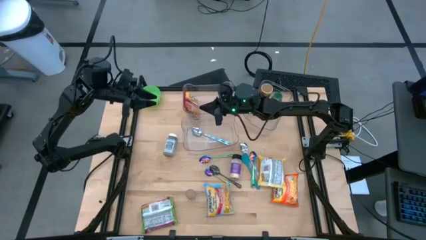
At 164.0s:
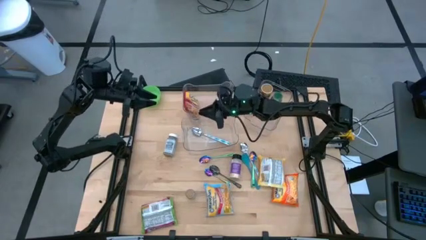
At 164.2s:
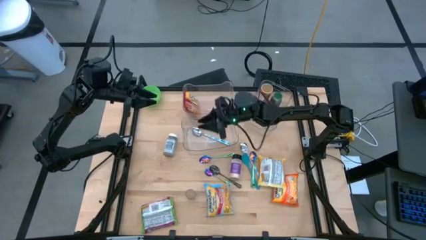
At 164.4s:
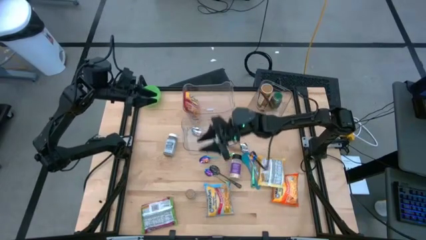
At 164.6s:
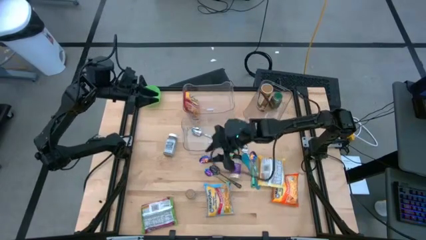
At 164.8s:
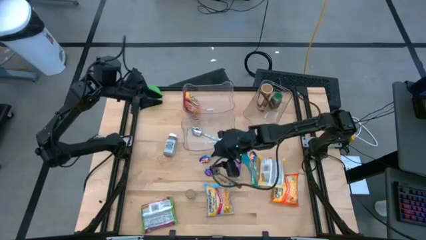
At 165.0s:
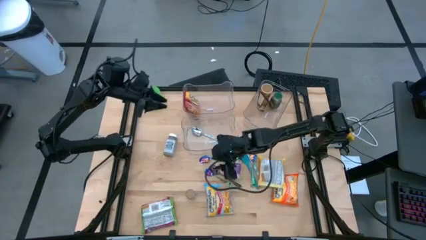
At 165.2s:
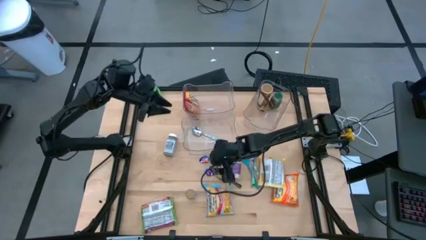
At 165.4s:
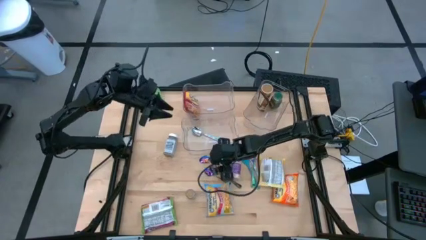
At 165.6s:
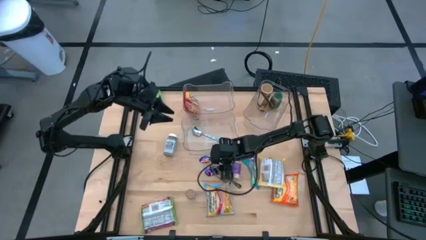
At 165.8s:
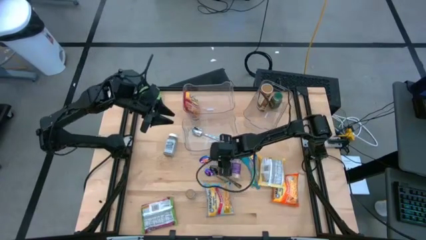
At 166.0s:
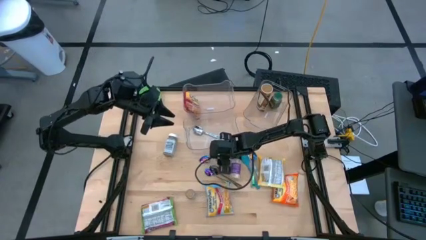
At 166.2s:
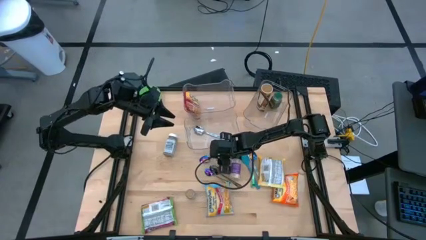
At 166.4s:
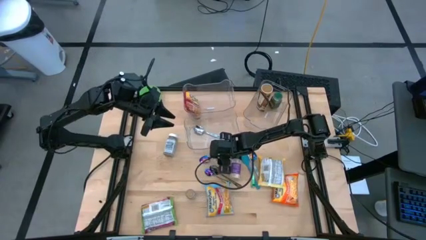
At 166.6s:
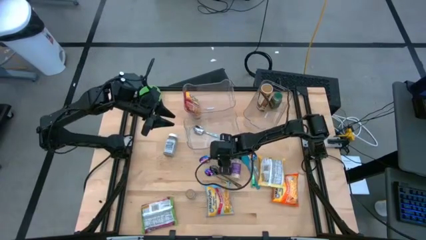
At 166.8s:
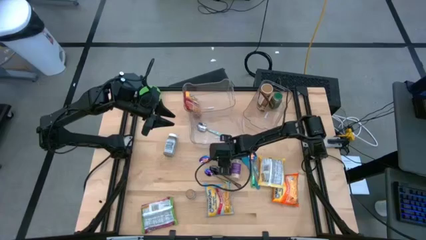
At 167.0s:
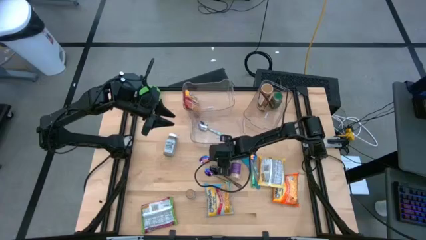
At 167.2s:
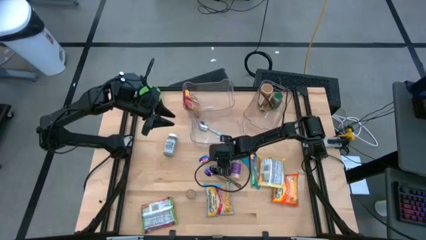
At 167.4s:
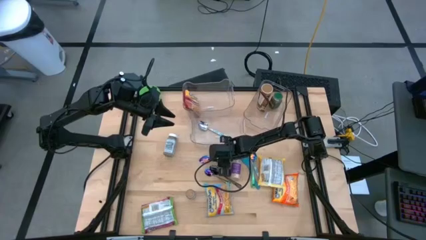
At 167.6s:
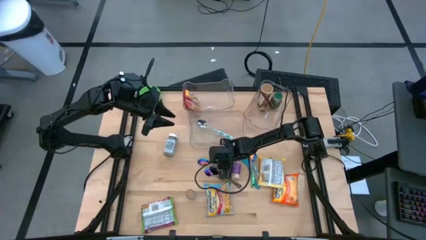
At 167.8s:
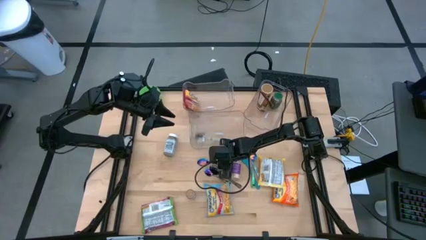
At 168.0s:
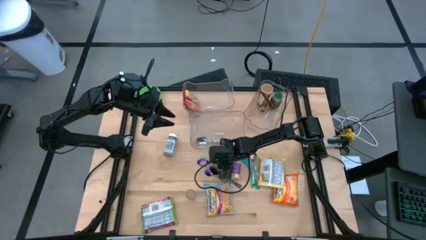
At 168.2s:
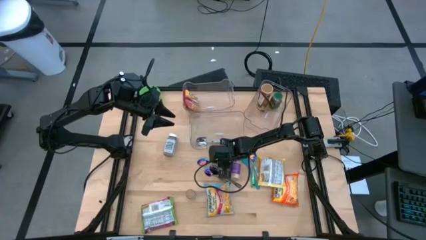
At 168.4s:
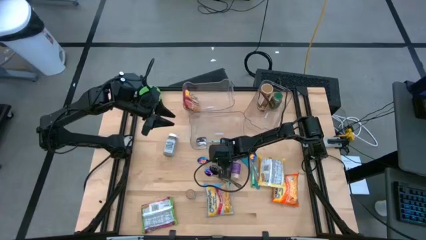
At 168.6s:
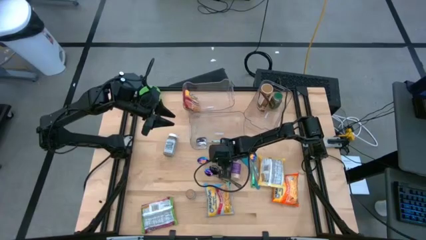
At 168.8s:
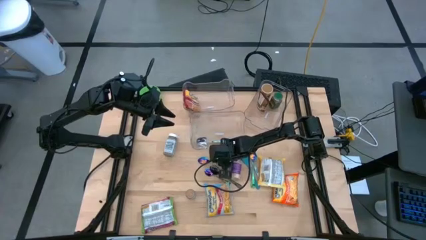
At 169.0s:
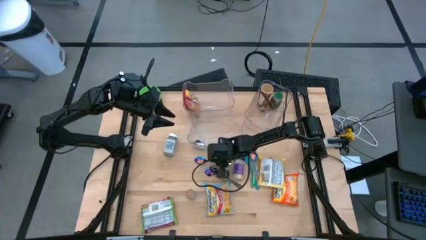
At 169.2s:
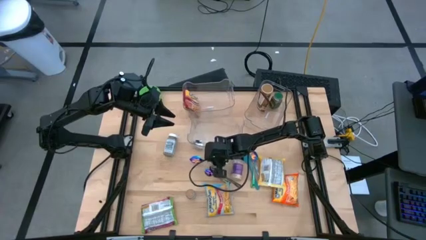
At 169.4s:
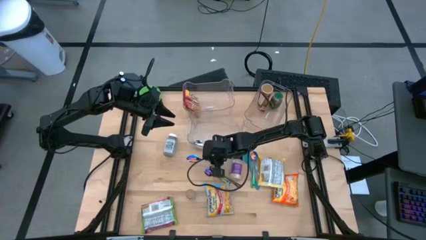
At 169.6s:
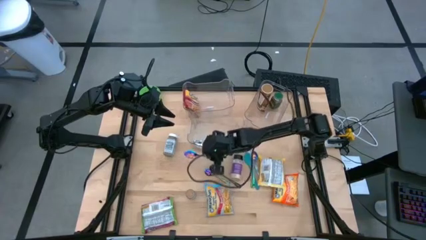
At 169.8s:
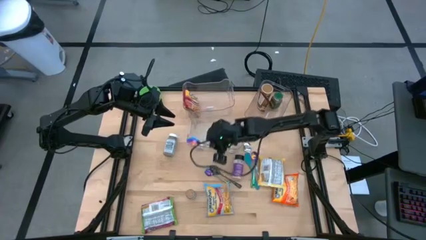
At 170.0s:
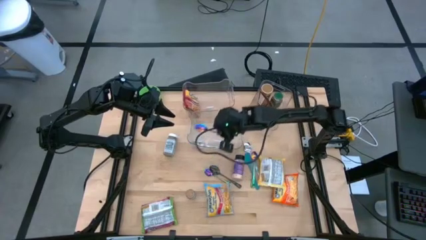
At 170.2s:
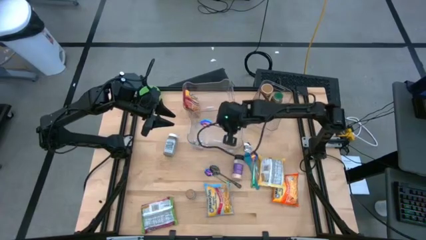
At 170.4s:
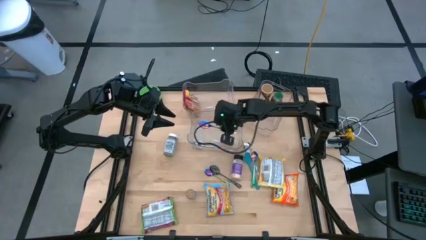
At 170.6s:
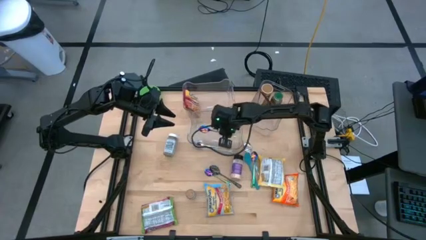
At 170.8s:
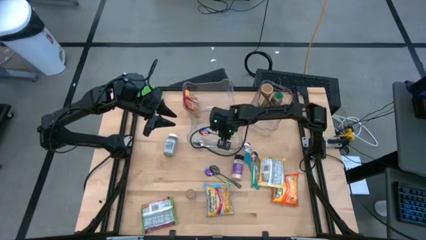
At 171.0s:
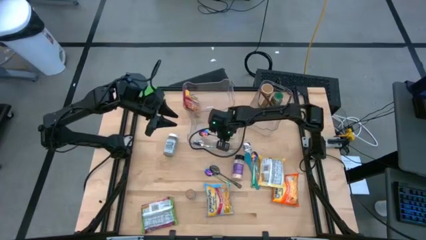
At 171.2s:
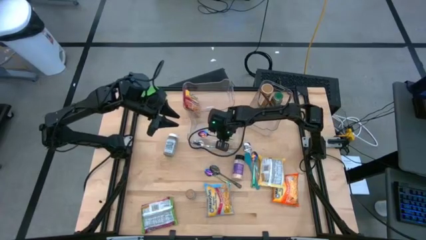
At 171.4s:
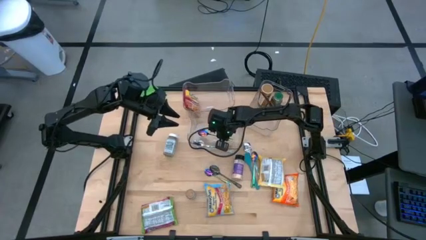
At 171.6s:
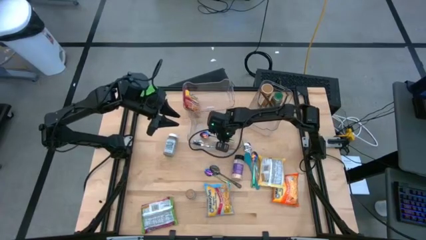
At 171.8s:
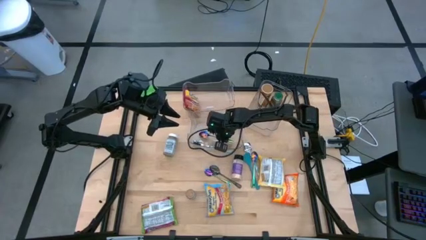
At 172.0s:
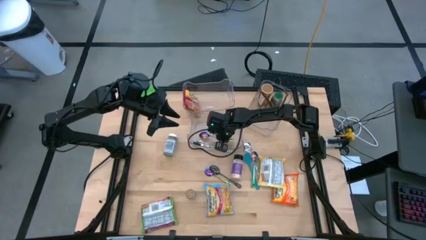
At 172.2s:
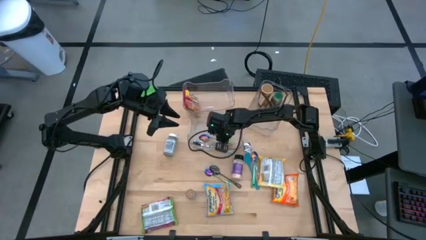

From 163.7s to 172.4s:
Task: Pick & Place Food Item
Put the left green spoon into the bottom transparent bin

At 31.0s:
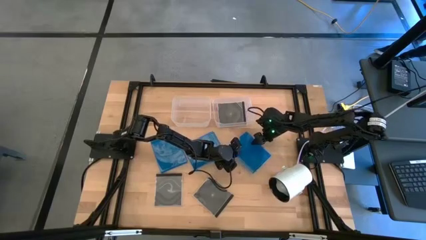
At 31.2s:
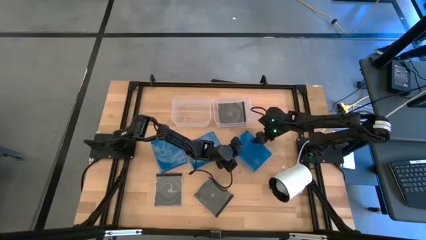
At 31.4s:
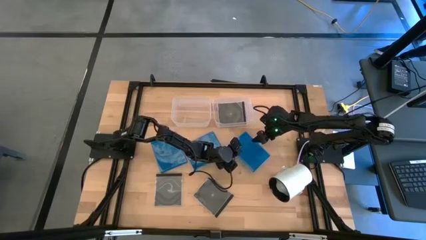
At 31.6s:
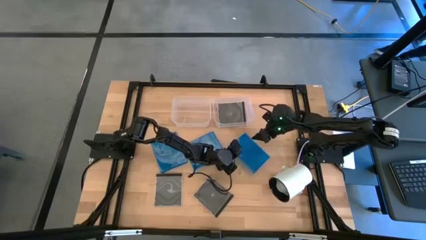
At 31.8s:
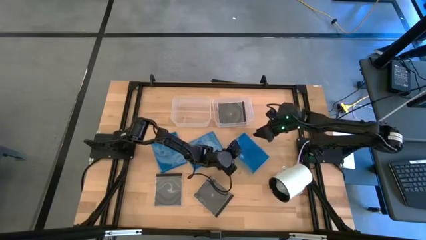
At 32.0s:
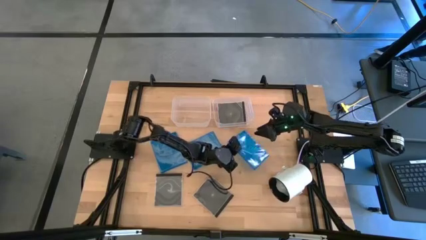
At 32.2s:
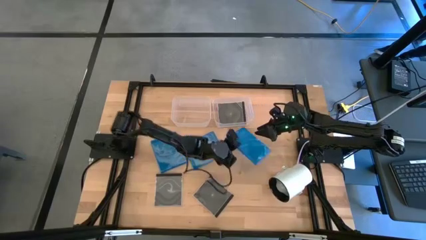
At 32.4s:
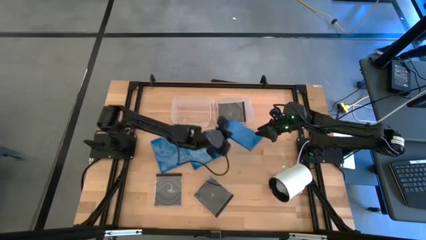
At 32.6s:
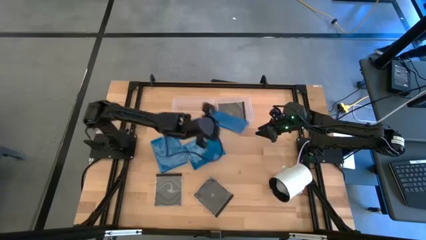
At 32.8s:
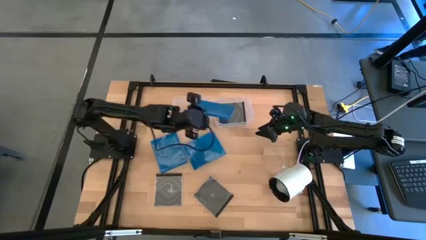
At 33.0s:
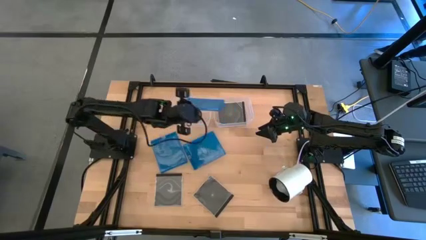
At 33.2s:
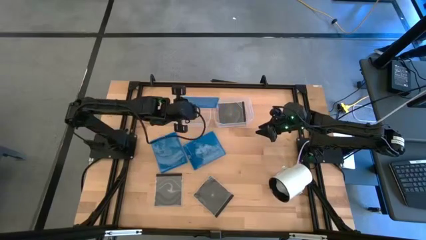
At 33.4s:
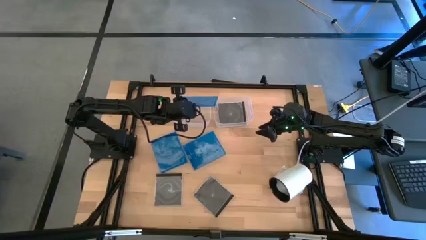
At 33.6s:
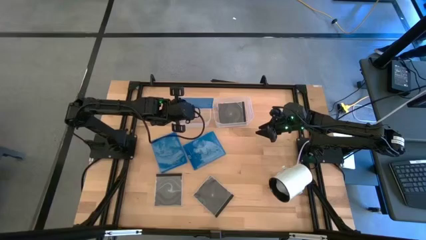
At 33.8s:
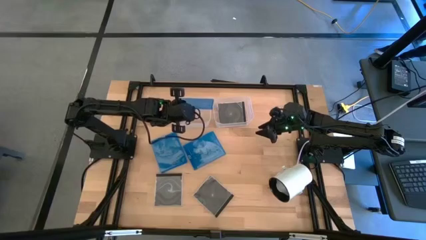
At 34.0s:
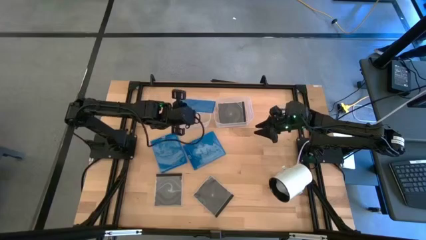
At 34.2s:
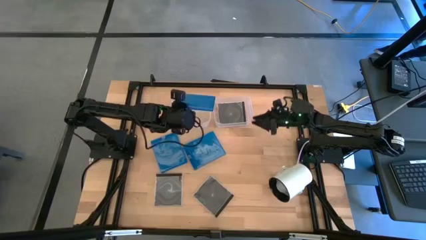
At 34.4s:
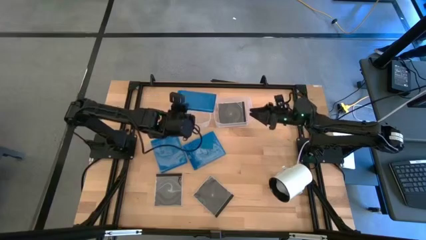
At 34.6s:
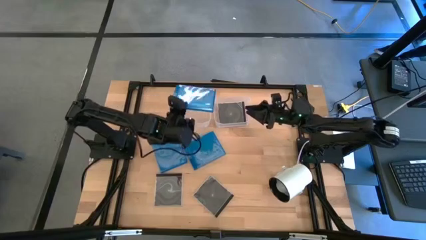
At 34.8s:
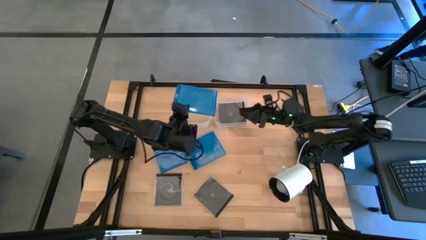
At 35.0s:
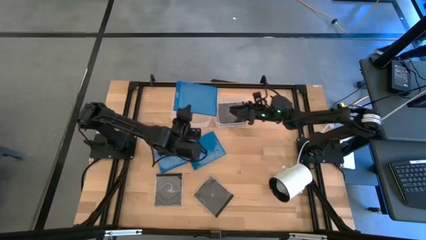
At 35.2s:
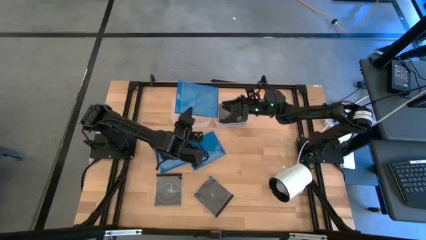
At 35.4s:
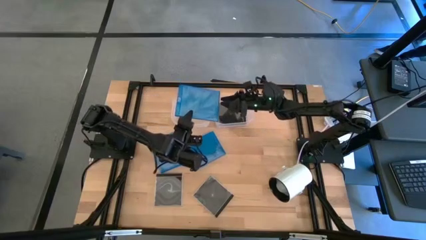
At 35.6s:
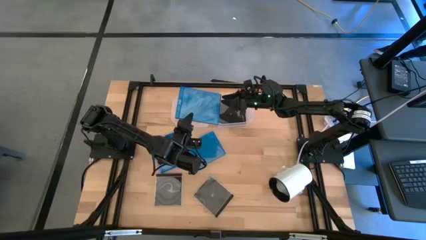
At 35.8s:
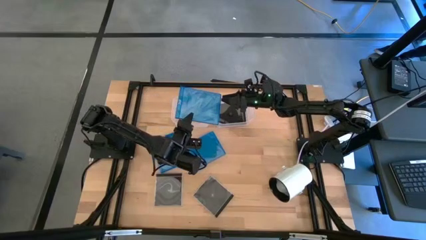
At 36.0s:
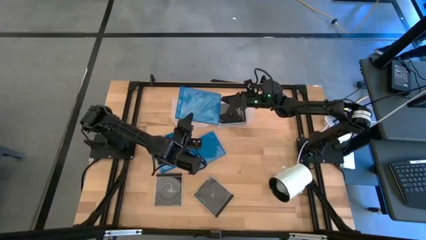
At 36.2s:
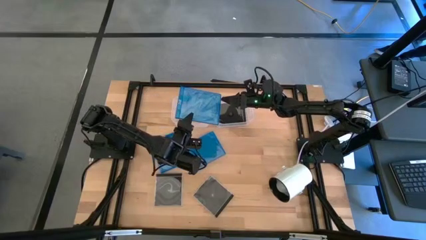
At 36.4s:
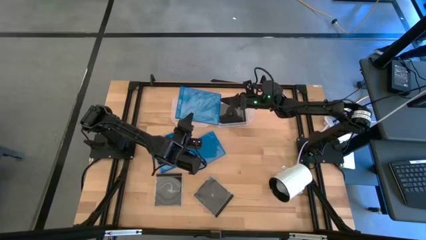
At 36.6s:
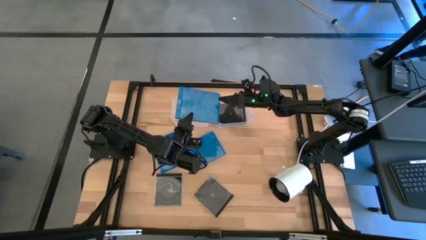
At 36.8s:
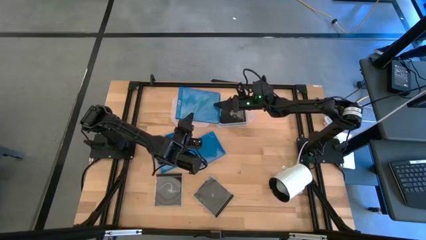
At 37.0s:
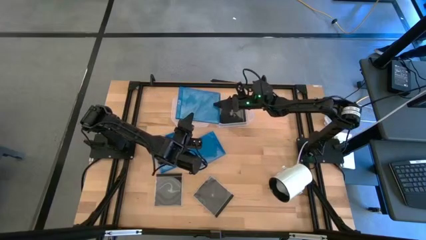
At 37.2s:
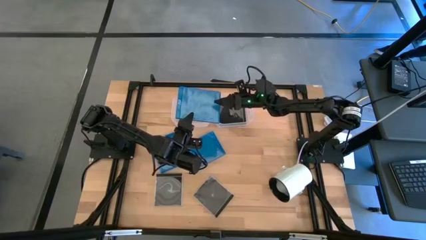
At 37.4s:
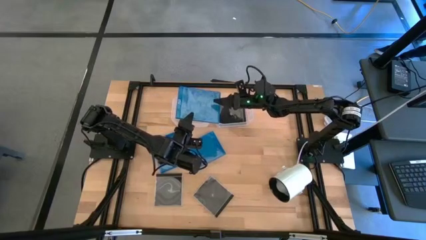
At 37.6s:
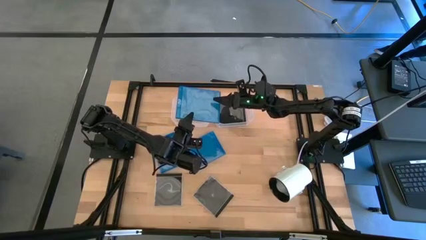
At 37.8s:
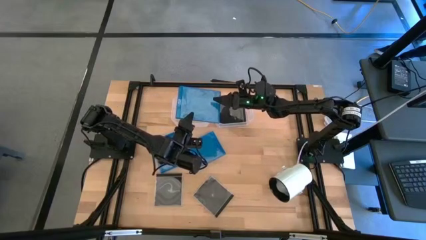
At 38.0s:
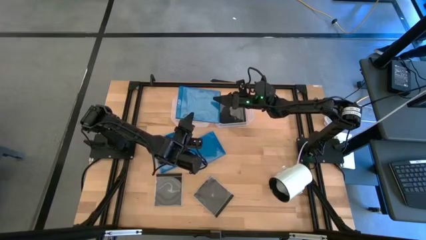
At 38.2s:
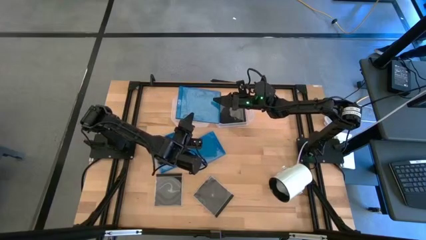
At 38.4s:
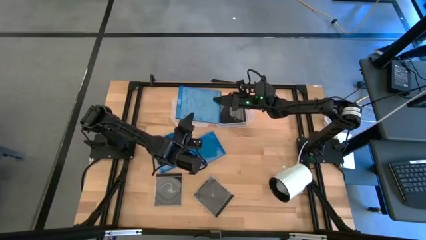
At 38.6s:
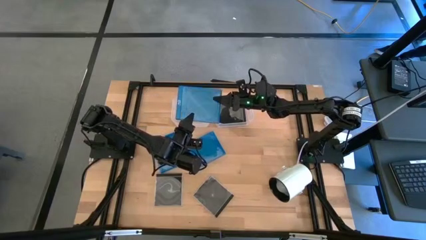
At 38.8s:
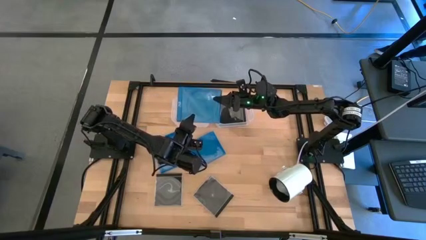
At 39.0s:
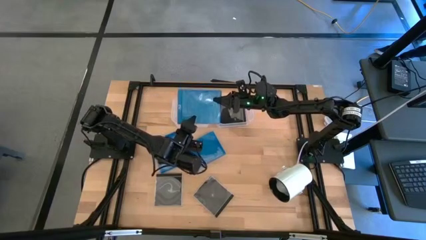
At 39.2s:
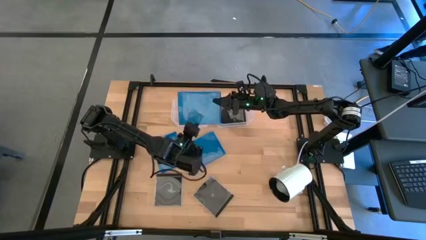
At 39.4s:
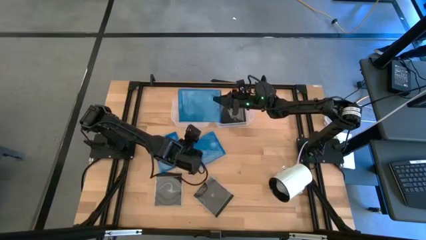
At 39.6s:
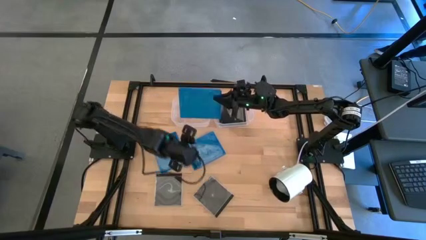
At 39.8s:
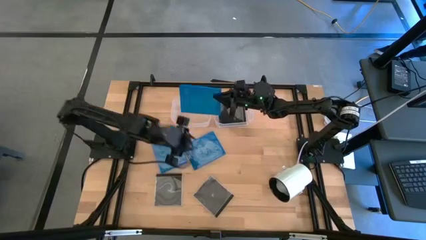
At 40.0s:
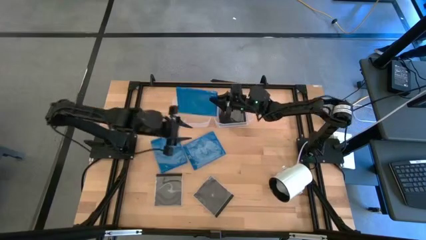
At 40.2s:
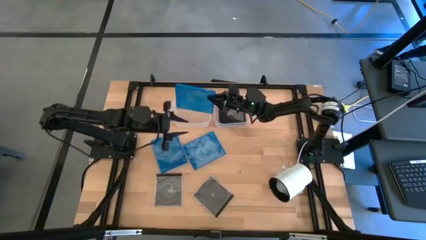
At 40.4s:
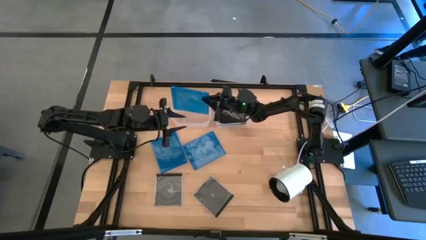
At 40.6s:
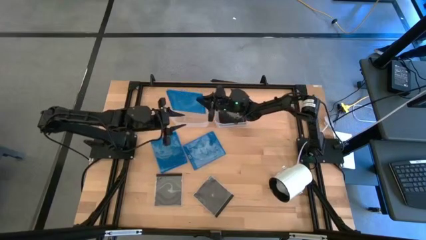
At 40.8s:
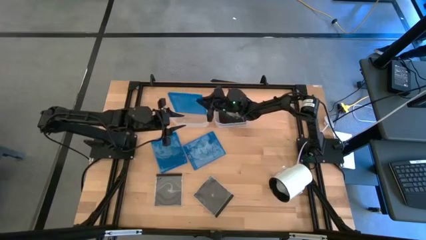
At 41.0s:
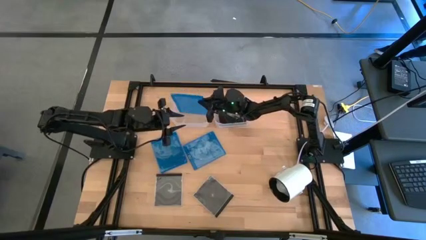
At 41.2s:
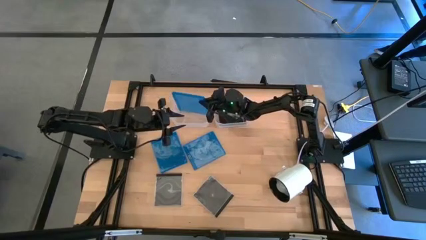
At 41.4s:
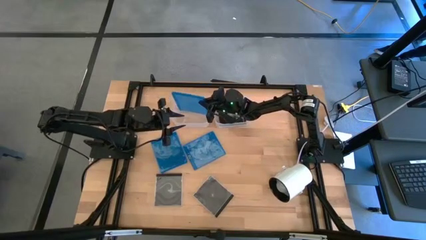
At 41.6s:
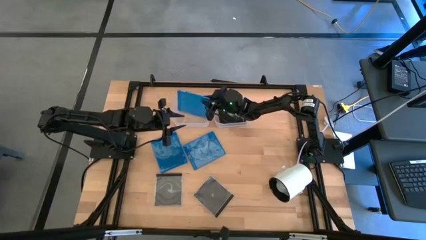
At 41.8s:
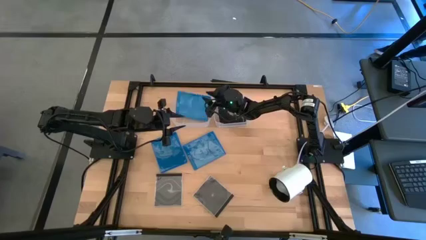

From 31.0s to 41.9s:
Task: Pick & place jewel cases by type
Put the right blue CD case into the left transparent bin
